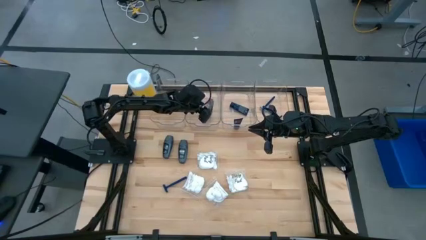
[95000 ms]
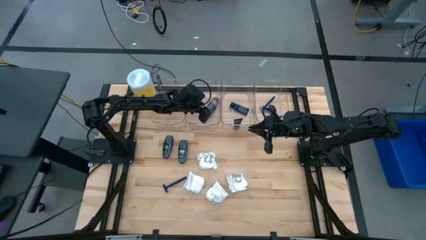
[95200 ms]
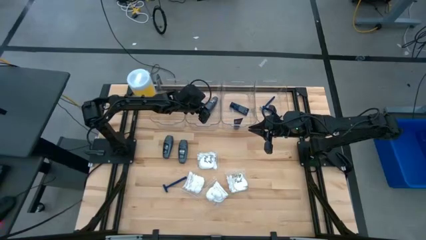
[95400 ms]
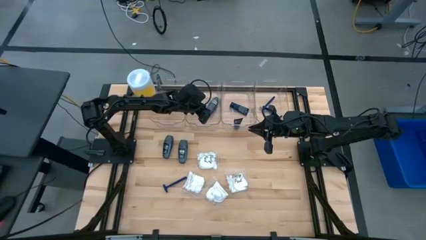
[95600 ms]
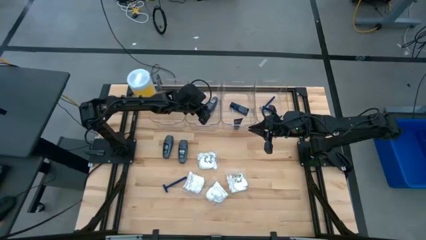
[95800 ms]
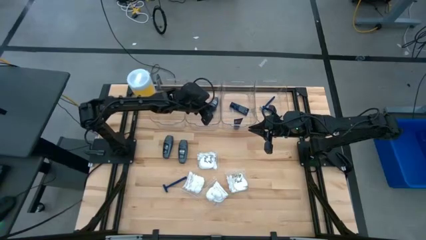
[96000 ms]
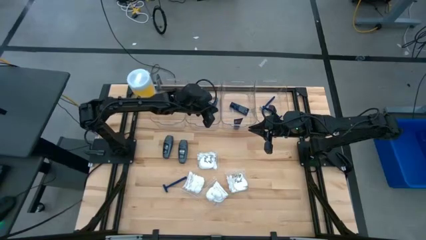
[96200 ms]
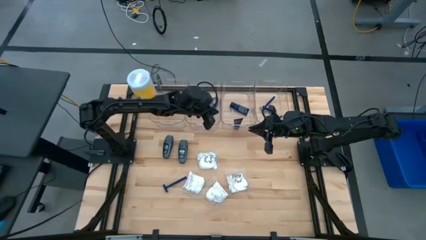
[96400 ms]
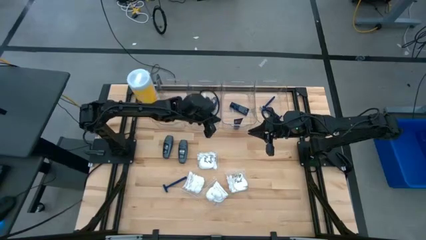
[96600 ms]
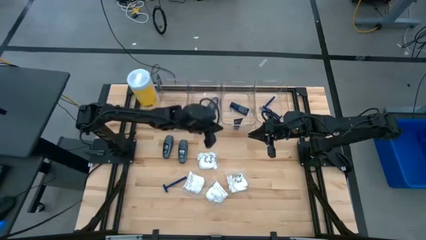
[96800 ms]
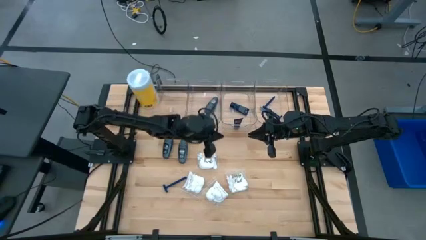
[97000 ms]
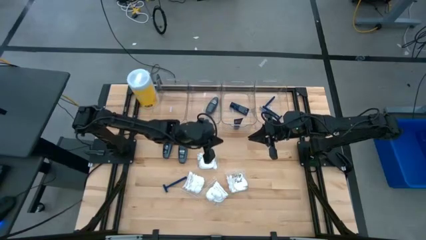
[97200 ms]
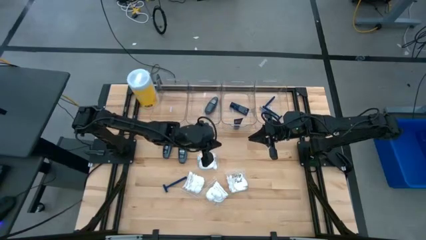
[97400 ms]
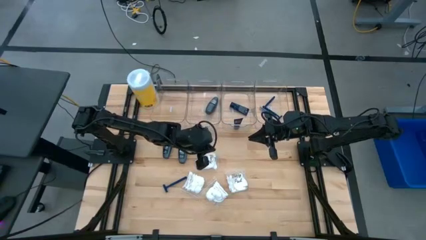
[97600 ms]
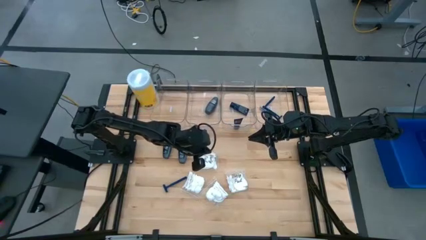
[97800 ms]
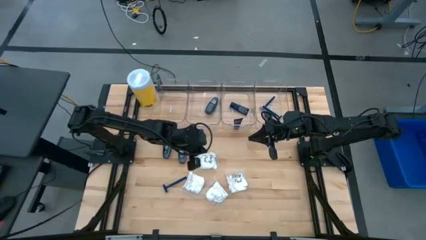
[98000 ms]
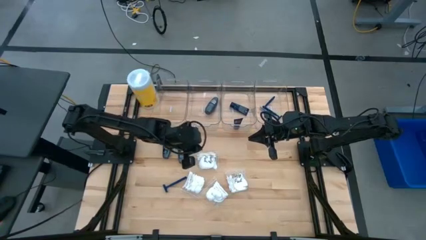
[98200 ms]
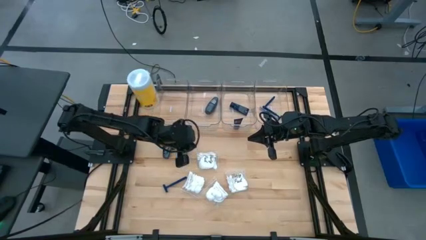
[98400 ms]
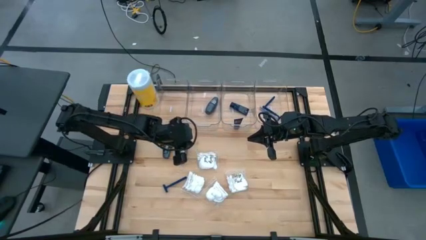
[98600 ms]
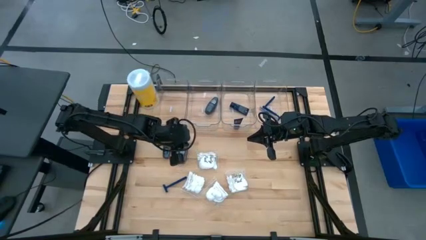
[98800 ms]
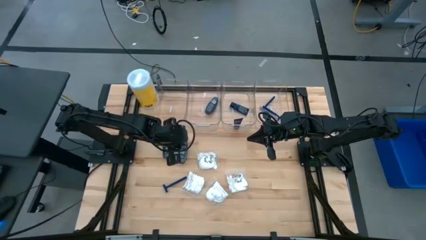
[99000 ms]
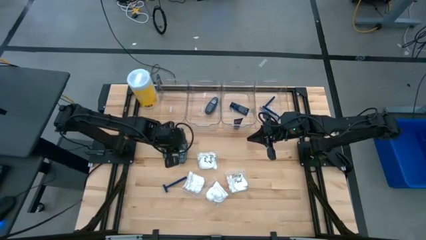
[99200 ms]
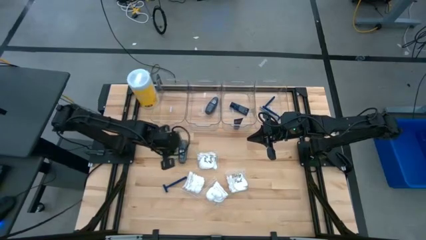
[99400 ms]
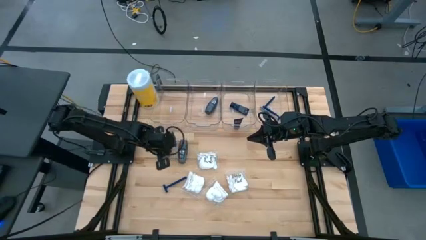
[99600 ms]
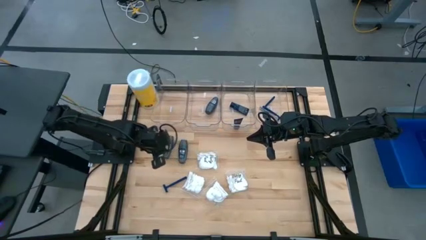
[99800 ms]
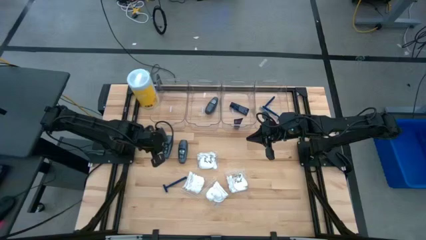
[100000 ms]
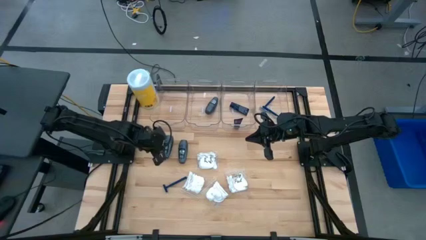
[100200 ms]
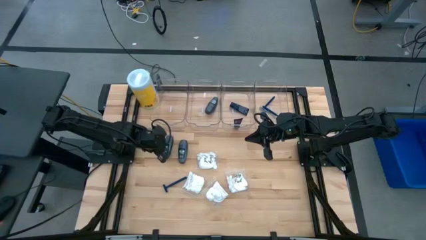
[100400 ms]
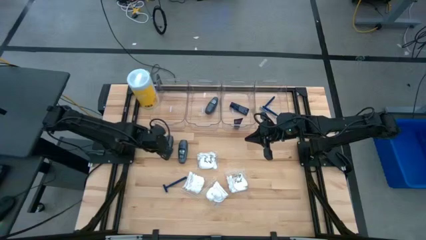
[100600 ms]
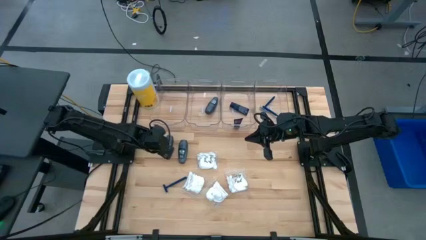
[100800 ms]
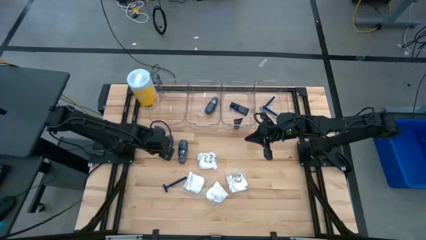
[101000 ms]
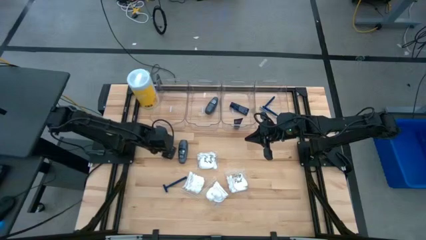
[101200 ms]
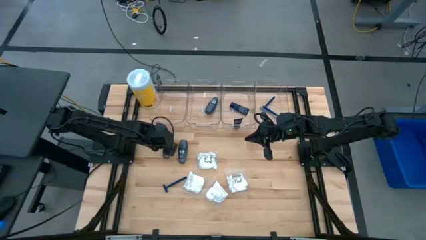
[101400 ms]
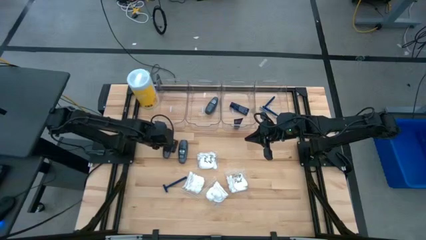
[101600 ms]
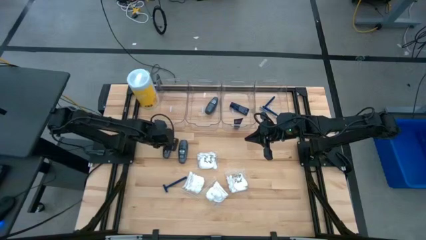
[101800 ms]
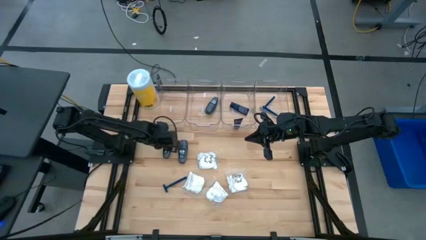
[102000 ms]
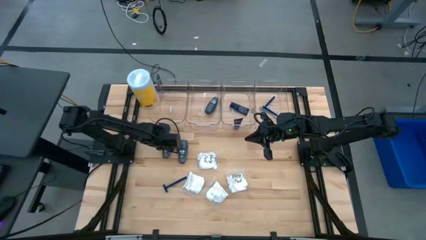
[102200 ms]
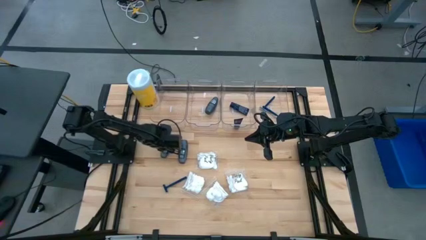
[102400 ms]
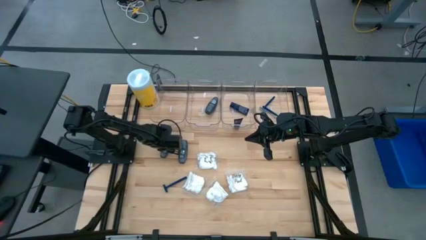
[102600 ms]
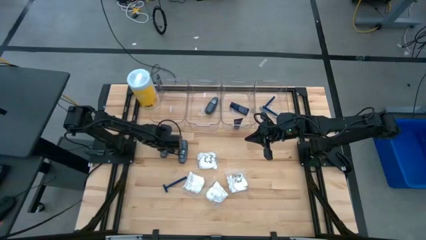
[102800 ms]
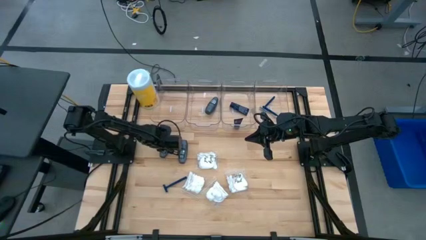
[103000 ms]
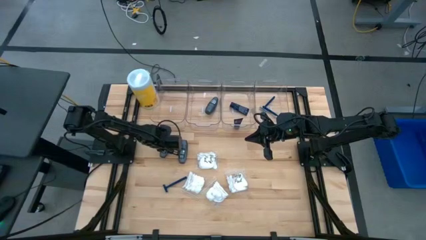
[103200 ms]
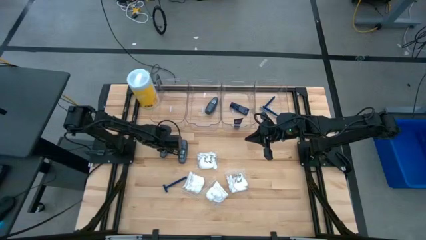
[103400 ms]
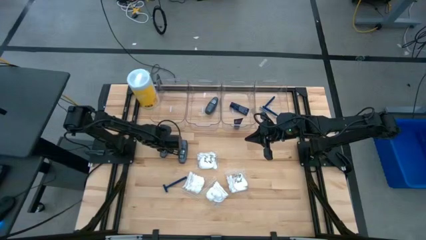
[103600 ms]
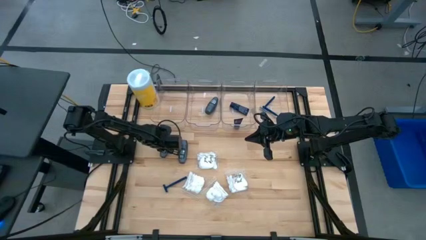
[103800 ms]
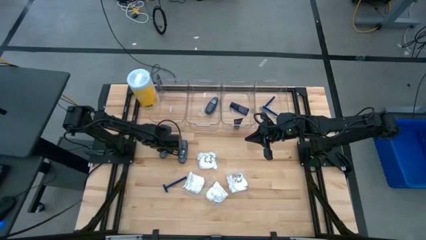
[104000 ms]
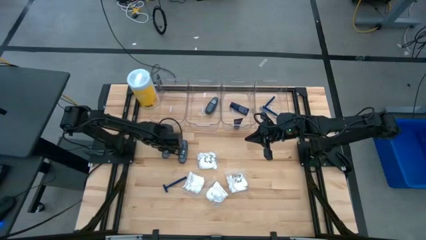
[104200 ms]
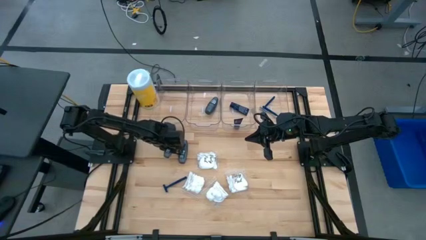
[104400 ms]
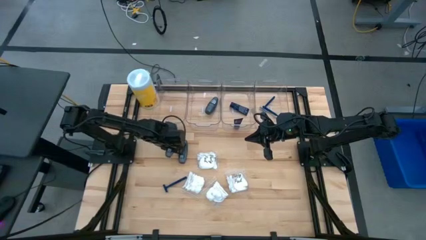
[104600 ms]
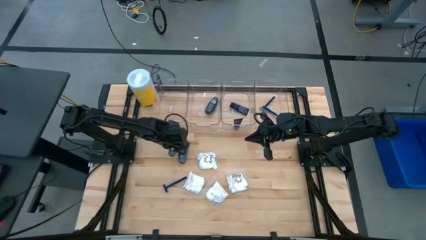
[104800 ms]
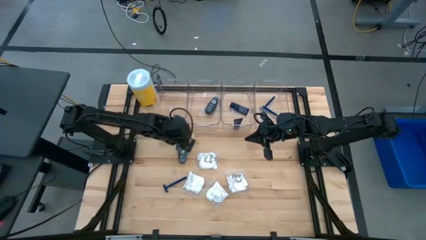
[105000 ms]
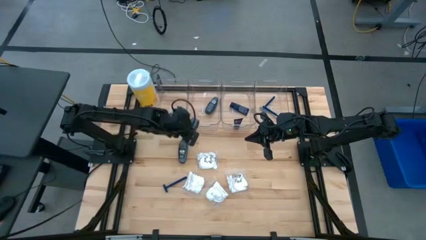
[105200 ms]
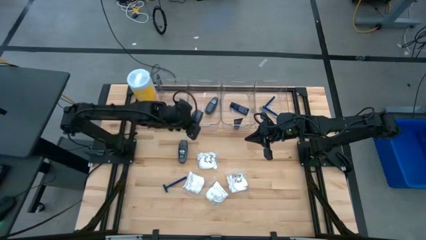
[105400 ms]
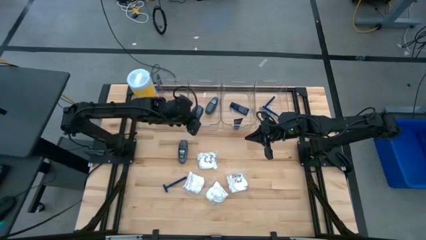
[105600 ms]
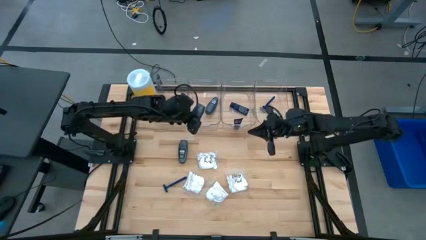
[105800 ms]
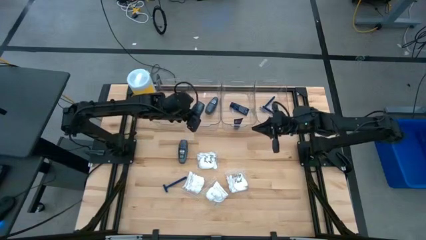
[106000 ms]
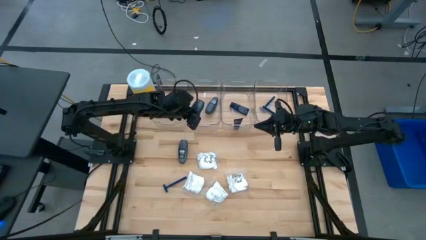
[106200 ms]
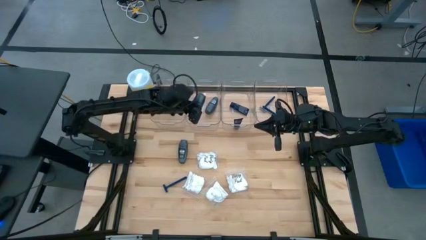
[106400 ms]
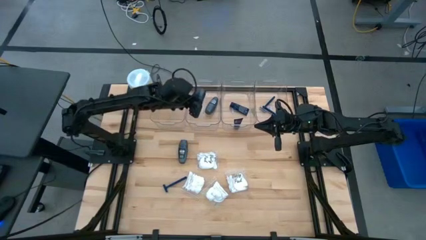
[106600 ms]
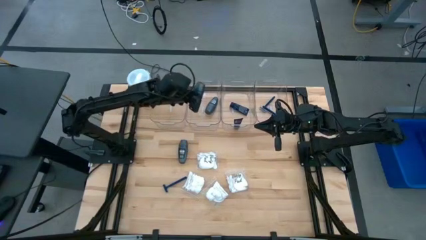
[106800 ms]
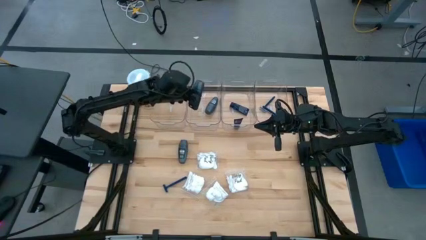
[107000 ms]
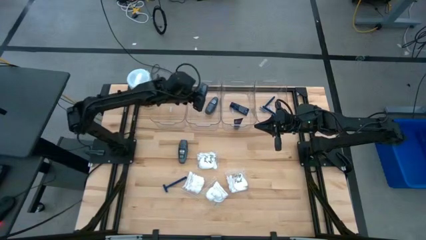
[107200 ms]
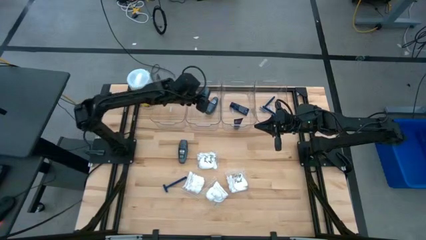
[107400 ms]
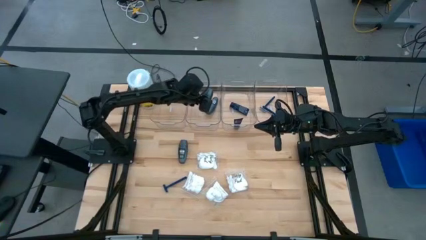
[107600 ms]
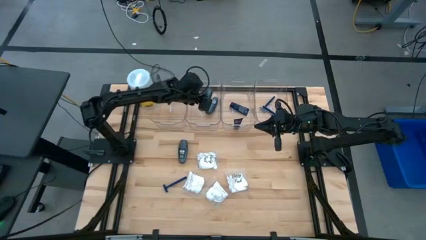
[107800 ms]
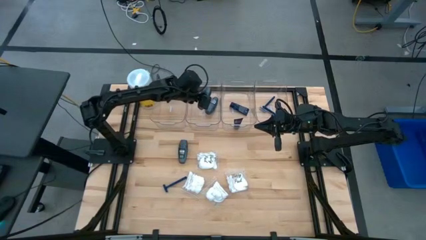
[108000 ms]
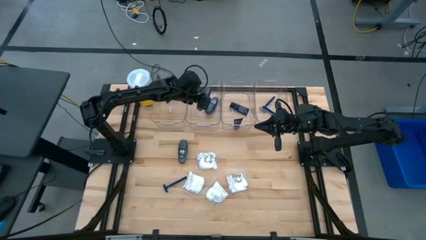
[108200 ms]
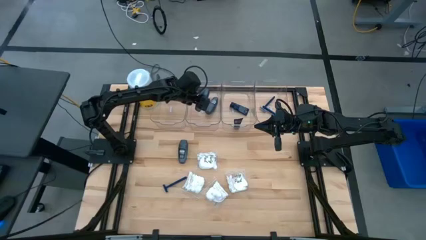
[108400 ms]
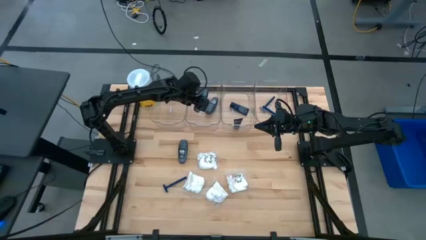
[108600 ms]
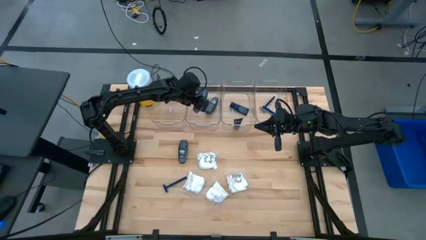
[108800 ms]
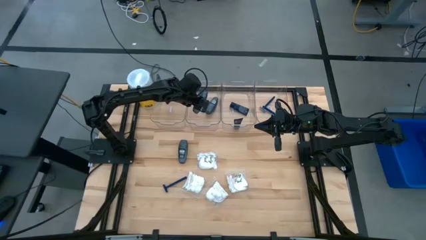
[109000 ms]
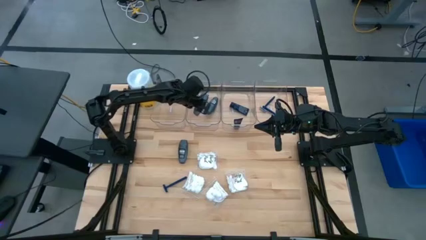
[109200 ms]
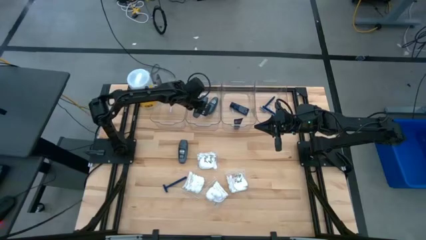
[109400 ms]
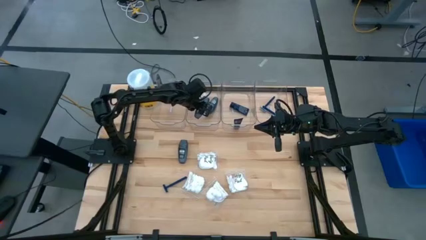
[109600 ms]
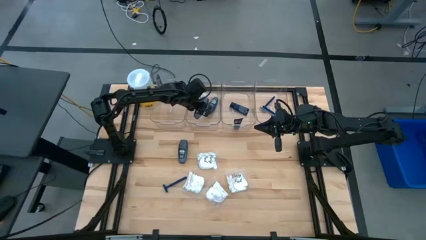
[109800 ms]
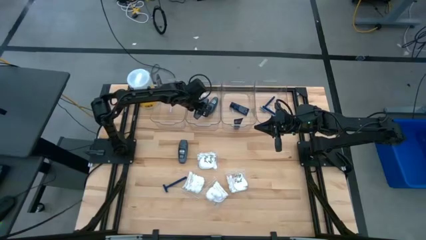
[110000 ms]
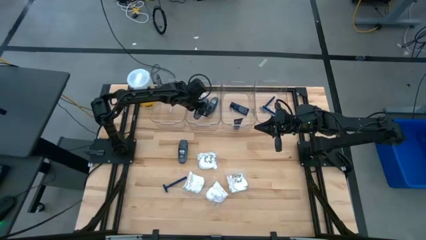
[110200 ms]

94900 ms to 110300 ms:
Task: Pick & Place Travel size toiletries
Put the black deodorant into the middle left transparent bin

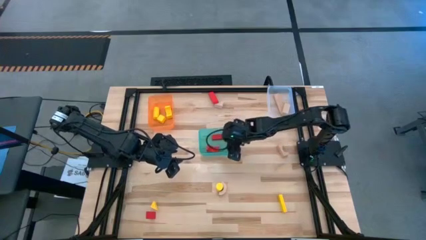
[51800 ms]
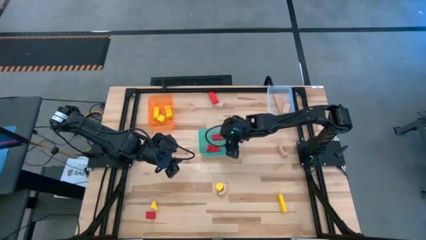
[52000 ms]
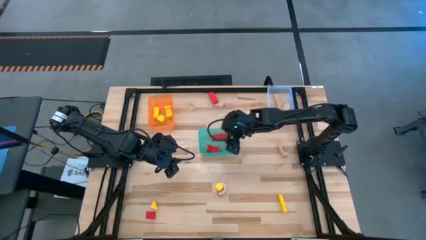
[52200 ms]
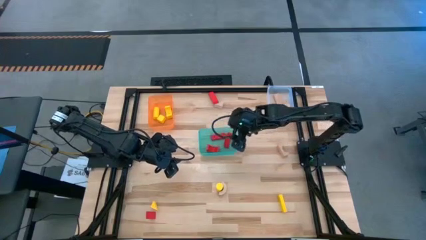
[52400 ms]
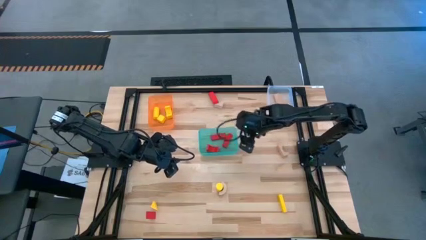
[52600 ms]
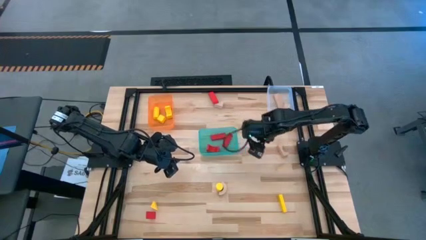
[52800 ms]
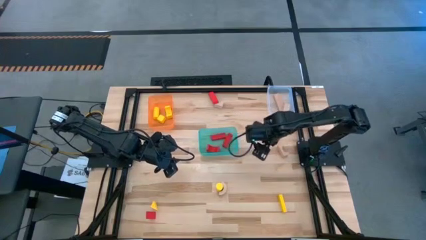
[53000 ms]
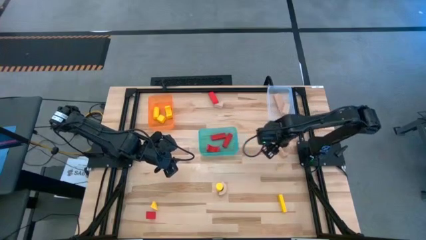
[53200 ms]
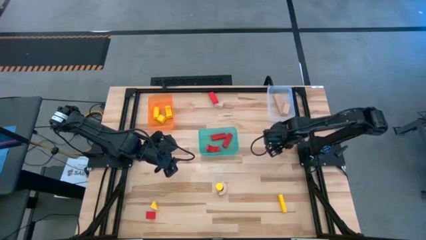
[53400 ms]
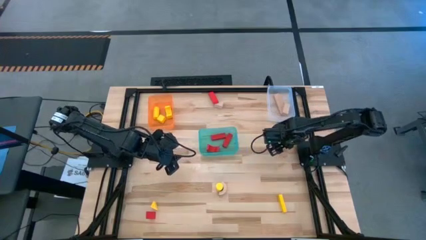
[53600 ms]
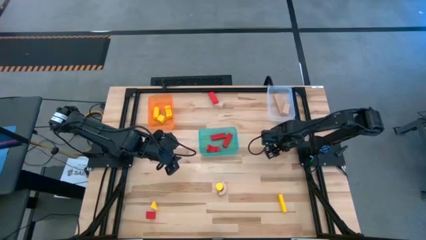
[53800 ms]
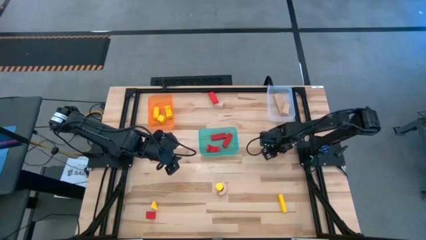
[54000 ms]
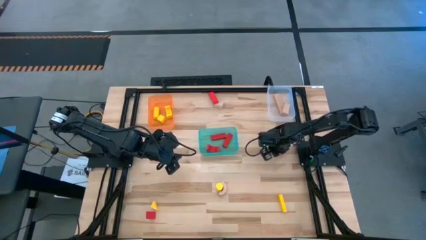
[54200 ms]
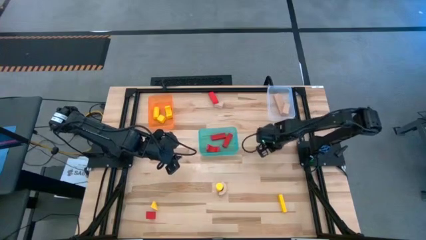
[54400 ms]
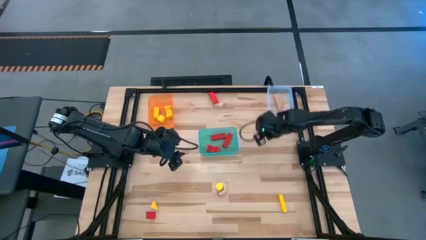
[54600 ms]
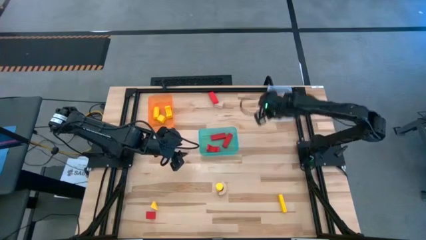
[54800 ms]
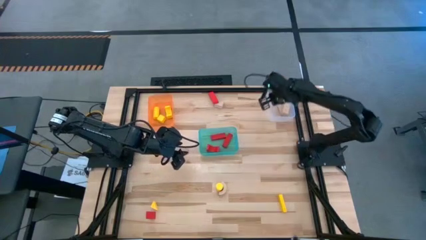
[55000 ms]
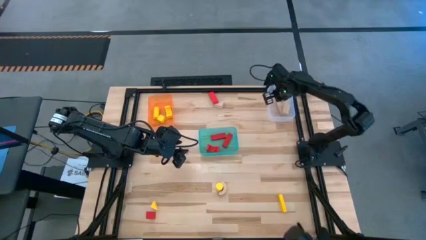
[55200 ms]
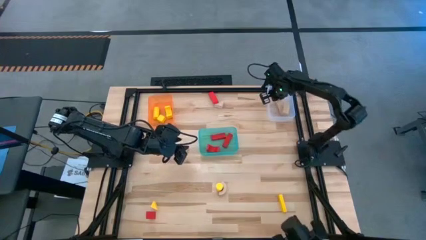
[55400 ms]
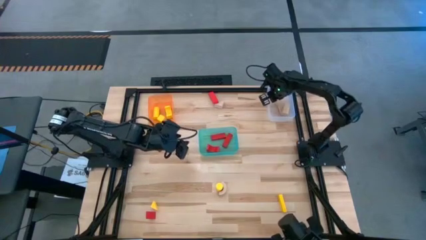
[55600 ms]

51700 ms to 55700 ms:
Task: Sort & place blocks by color
Put the brown block into the transparent bin
